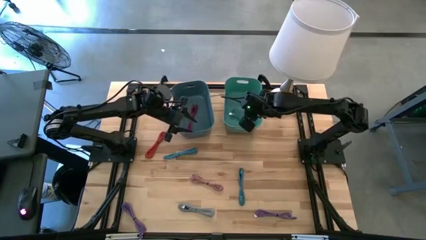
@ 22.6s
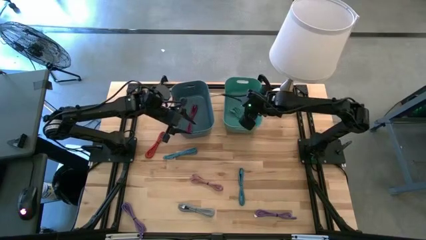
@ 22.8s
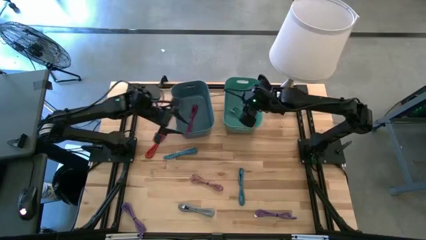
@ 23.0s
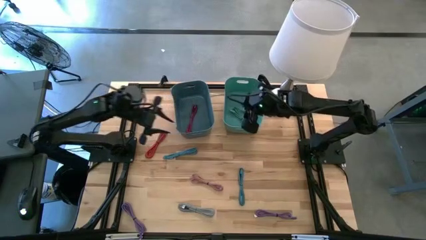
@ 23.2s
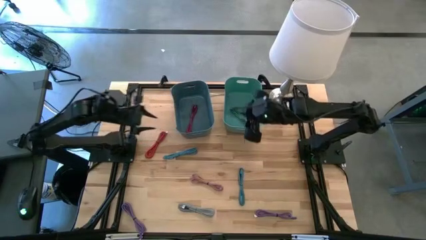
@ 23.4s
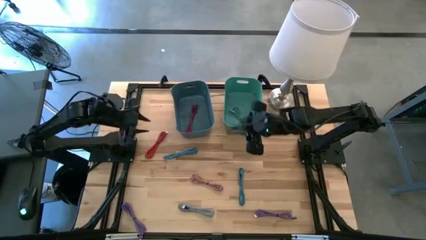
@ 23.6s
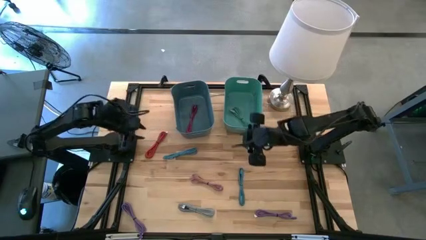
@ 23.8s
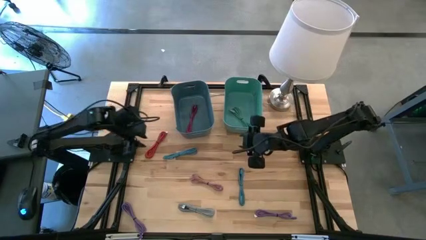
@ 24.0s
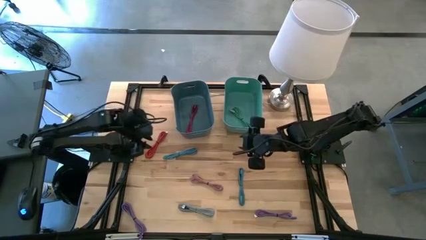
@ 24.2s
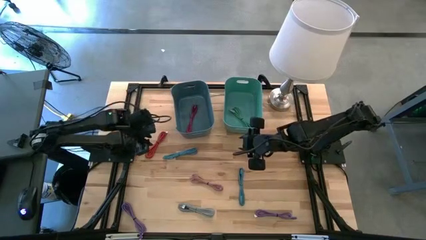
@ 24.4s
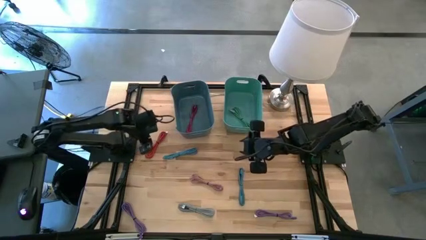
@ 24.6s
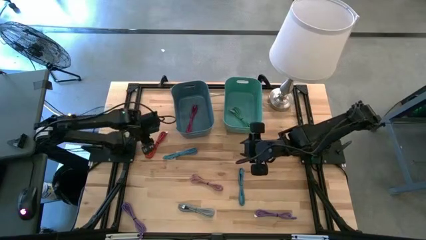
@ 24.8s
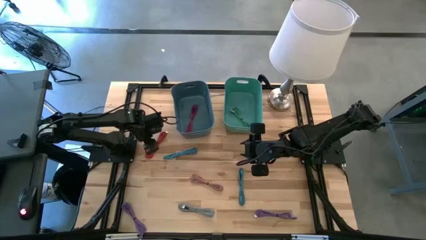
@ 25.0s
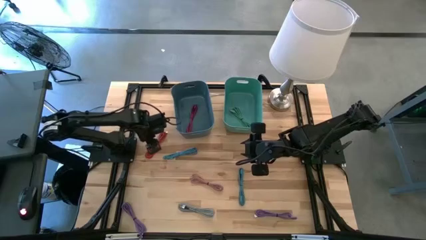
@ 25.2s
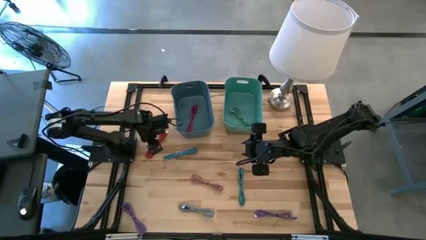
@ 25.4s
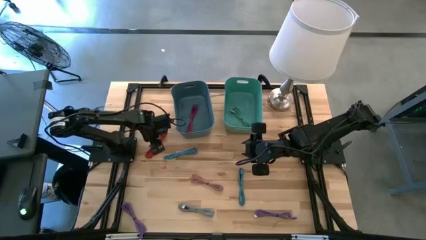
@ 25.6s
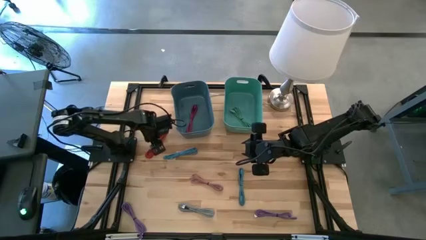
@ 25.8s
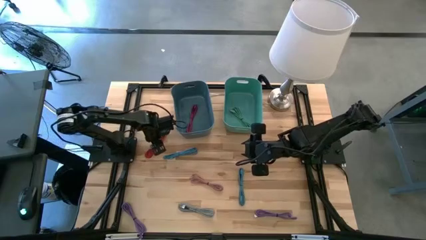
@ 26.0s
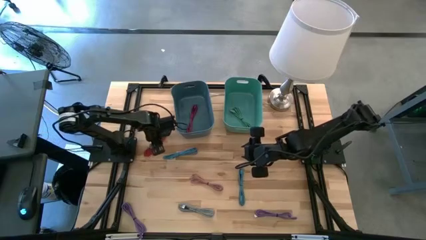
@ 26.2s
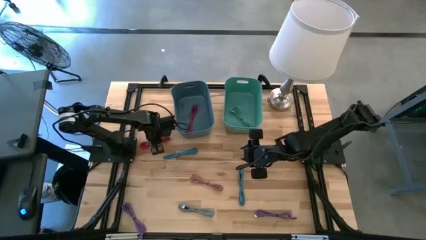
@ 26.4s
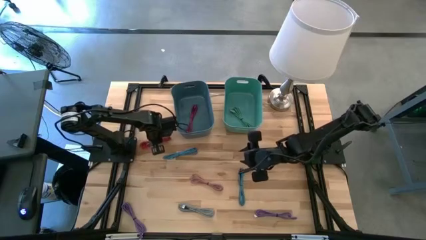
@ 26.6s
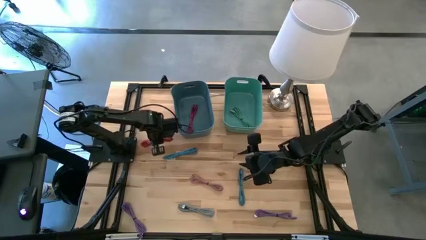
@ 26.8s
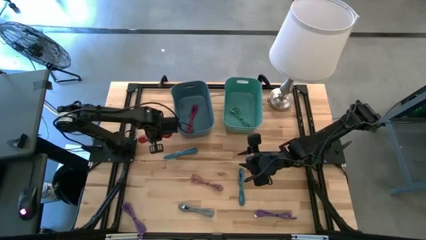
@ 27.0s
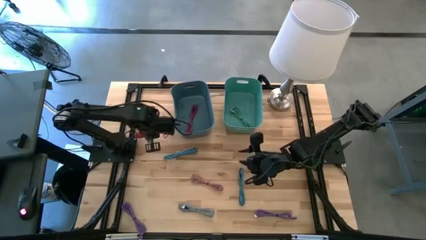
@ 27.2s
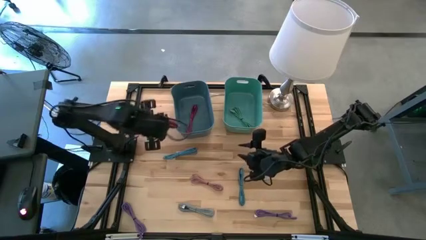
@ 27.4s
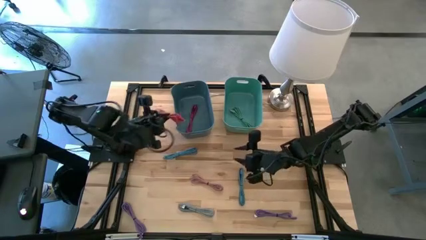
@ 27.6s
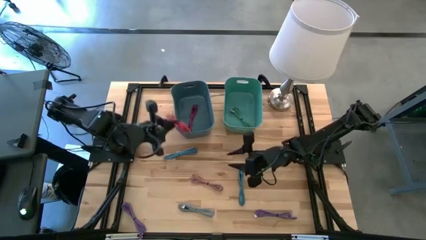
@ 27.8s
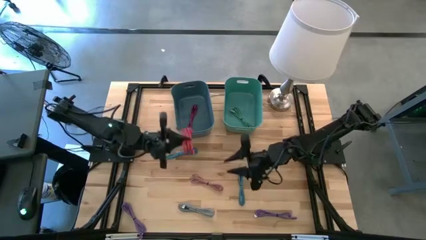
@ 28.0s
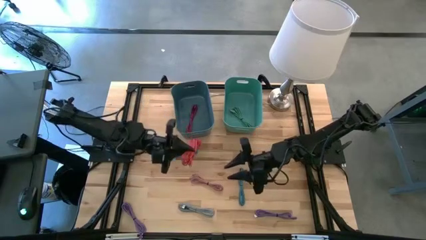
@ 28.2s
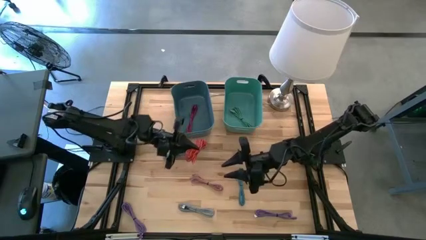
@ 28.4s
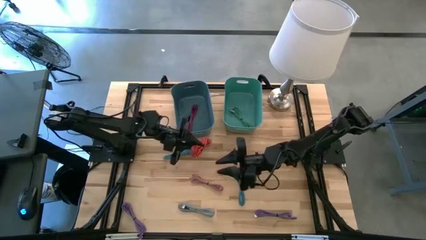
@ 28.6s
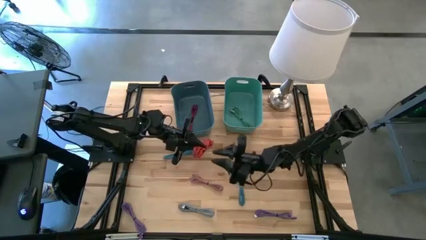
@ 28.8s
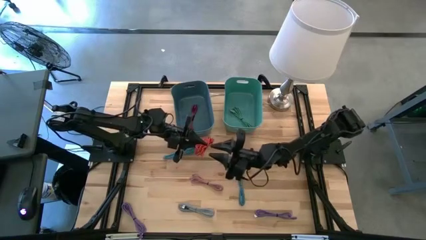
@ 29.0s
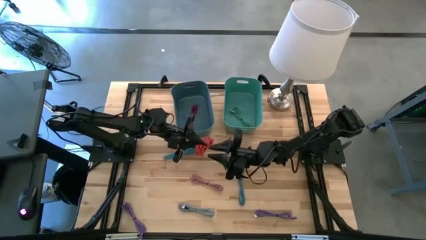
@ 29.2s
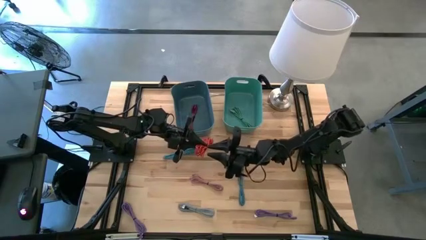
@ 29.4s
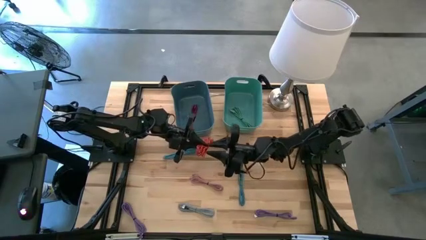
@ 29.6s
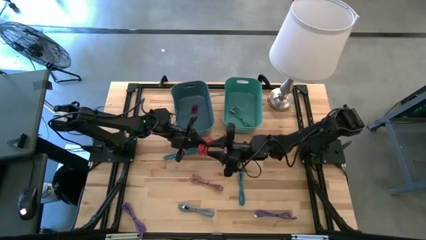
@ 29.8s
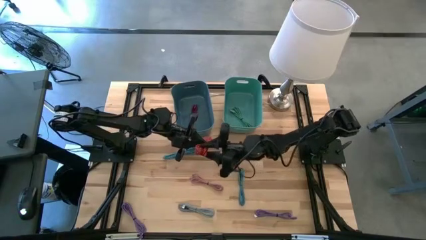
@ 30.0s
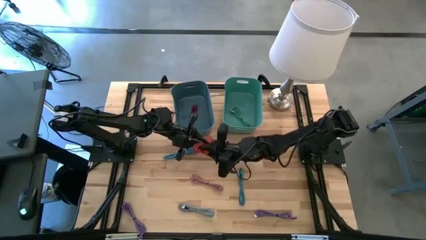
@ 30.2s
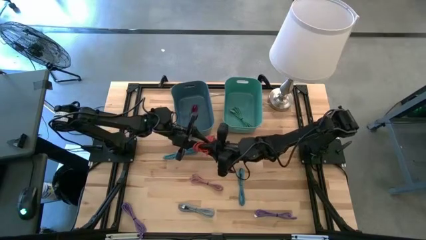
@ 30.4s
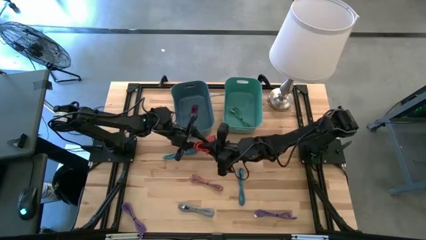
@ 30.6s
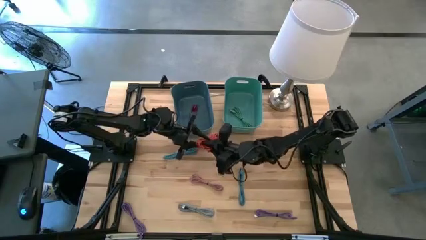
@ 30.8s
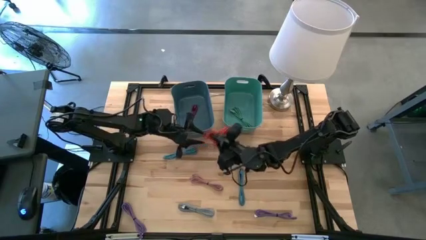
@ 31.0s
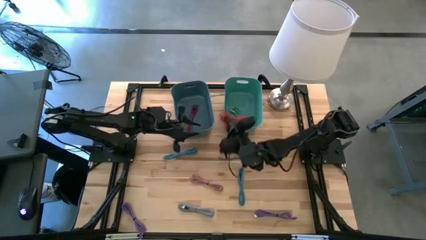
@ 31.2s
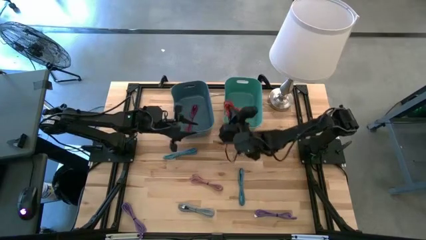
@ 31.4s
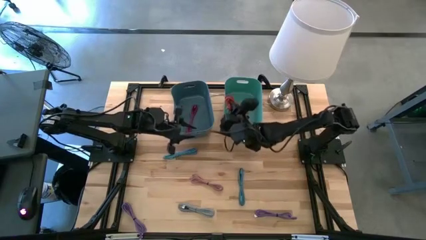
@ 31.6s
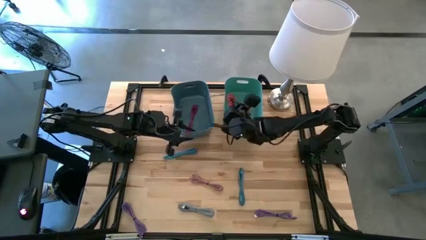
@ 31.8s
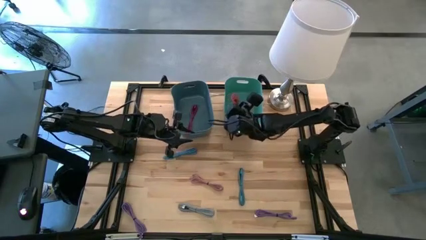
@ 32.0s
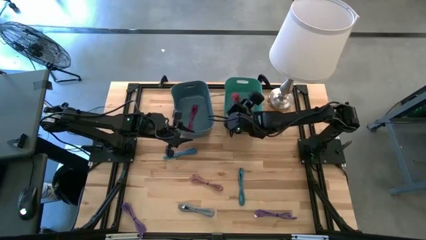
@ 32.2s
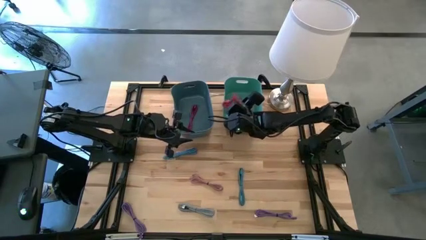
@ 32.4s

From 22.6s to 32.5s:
Task: Pick & Place USB Port
Put the red charger cable into the green bin

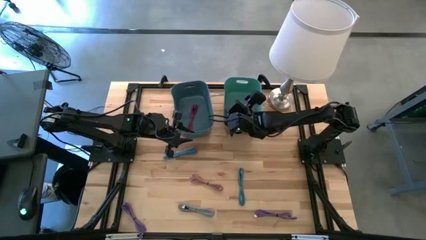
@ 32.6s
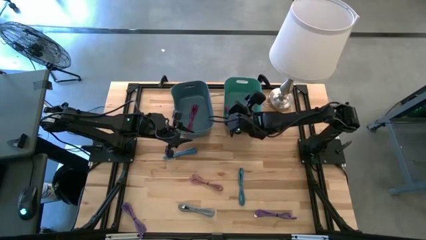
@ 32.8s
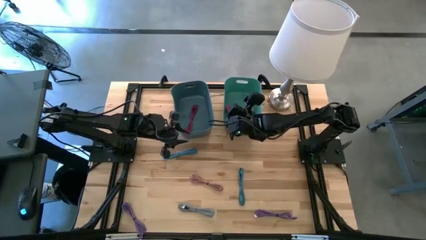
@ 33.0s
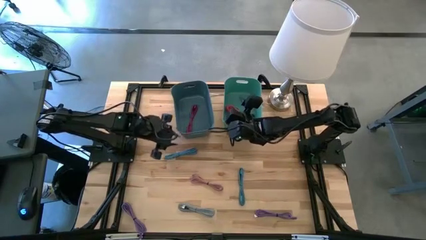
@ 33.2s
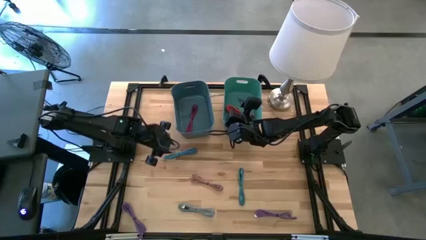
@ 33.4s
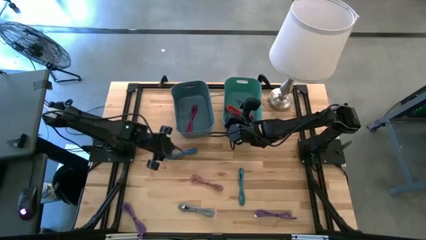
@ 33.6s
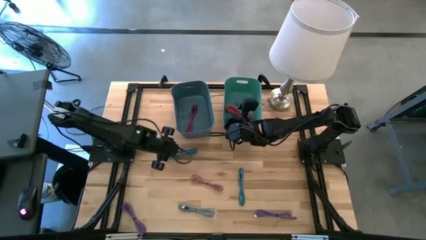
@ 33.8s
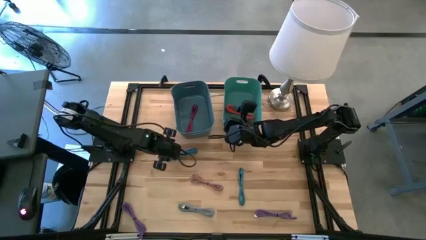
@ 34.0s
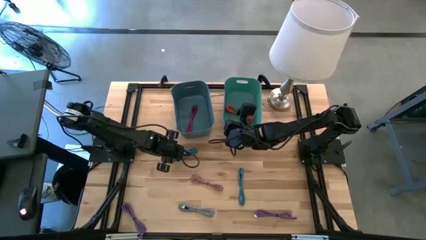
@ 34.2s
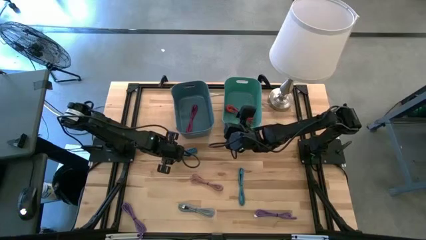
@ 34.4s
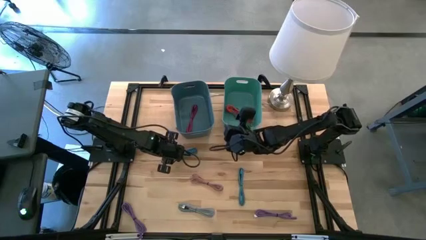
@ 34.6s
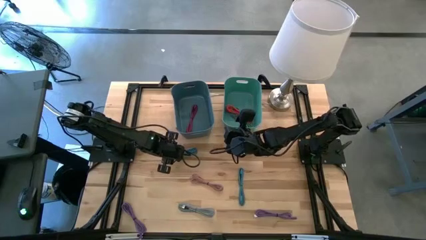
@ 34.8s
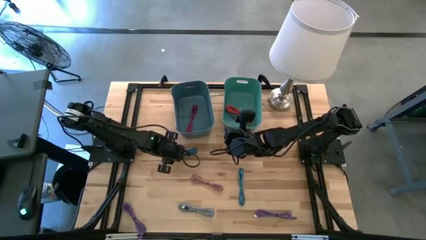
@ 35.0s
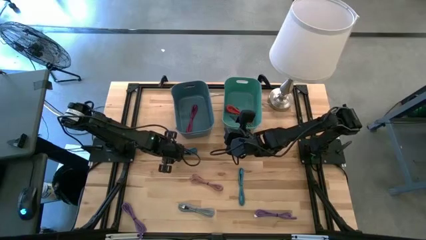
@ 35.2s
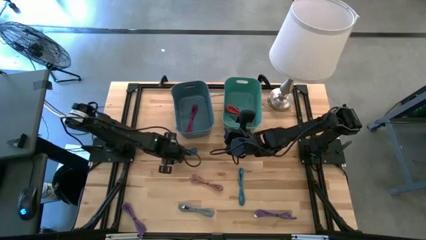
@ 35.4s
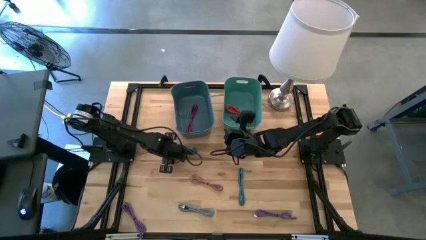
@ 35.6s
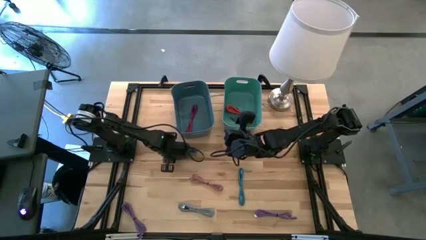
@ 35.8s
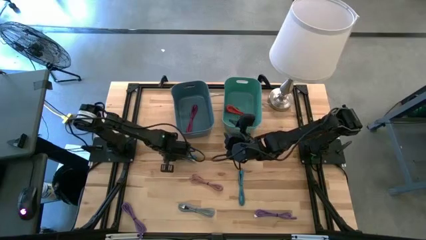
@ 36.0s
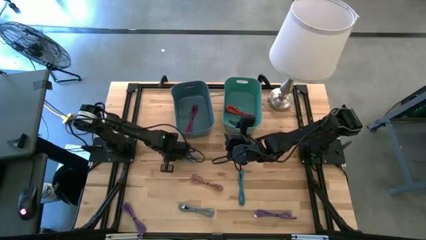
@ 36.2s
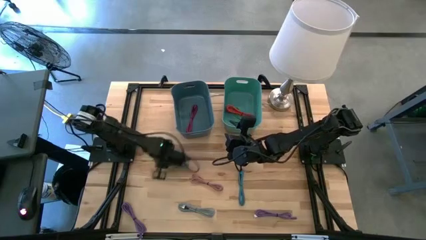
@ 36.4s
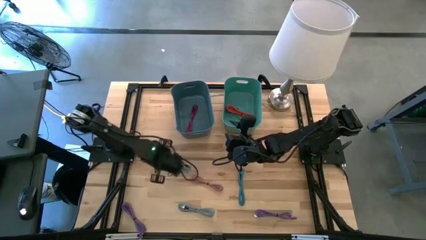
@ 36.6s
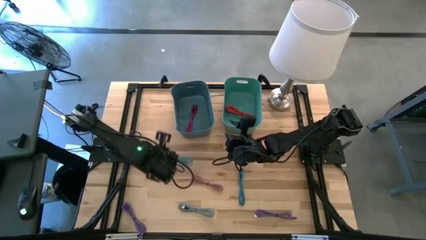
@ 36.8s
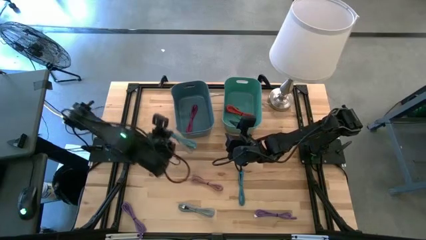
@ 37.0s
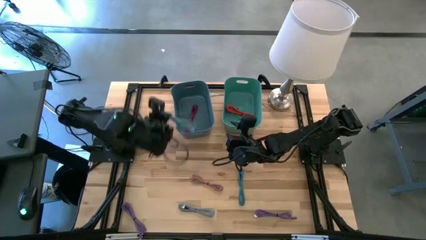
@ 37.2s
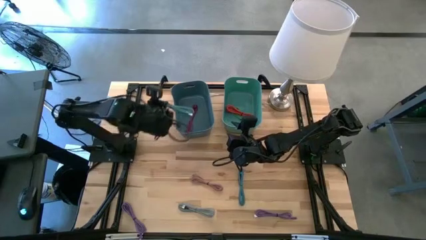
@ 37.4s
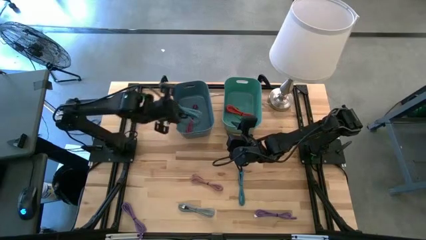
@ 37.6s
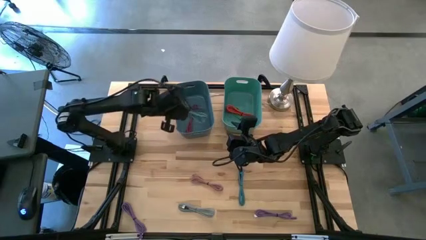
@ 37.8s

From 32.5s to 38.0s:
Put the top black and blue charger cable into the blue bin

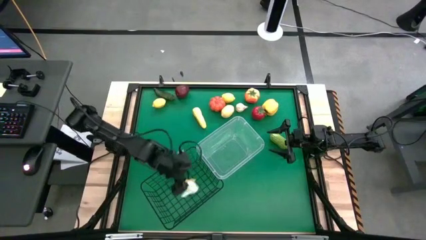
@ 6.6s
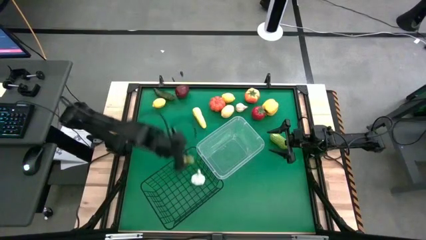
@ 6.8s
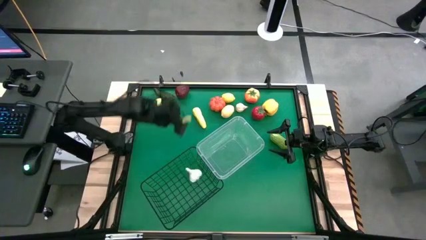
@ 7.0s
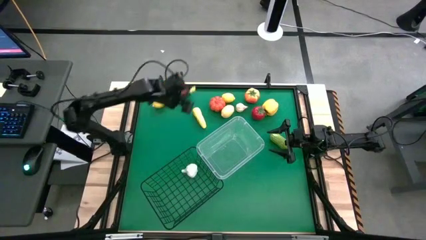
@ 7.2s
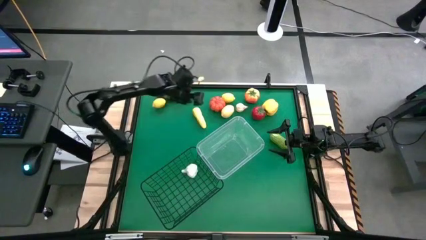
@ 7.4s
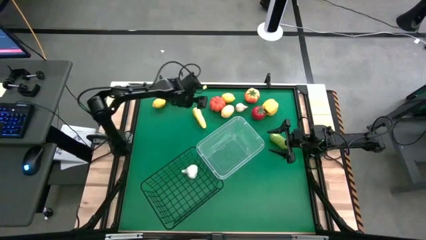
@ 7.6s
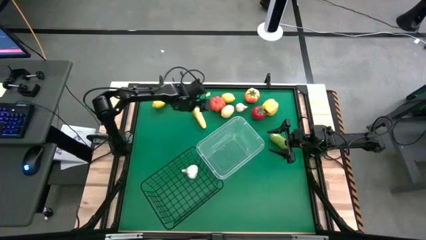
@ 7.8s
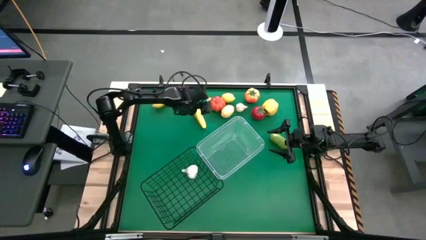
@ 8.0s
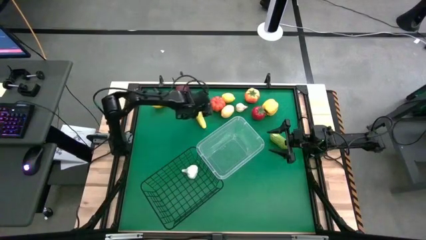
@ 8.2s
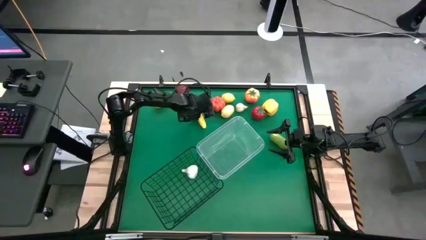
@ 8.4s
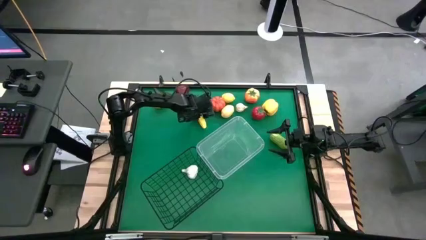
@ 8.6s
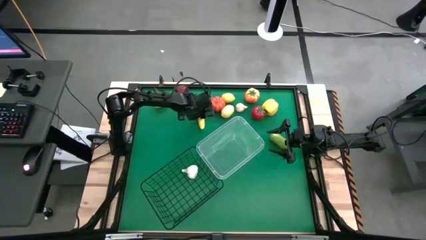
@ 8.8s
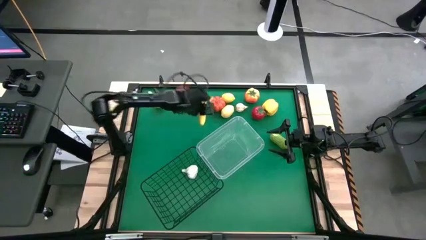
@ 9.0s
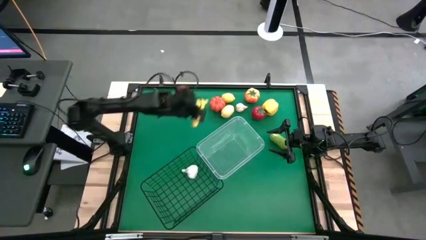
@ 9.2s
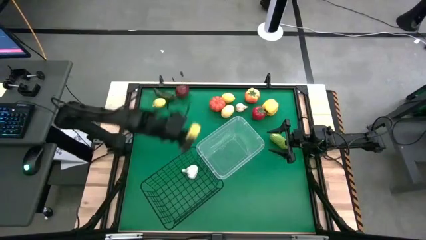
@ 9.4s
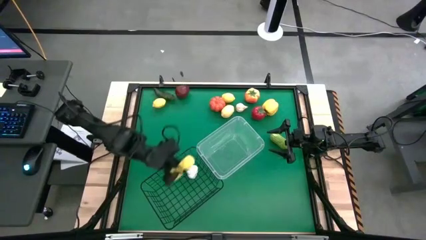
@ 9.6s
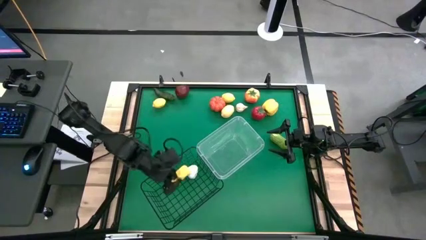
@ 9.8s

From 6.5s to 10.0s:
Task: Sort produce into baskets
Put the corn into the wire basket
